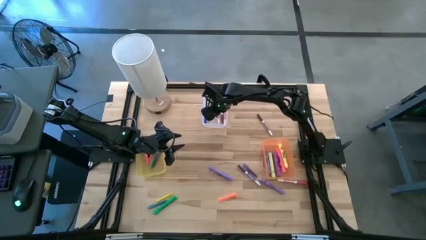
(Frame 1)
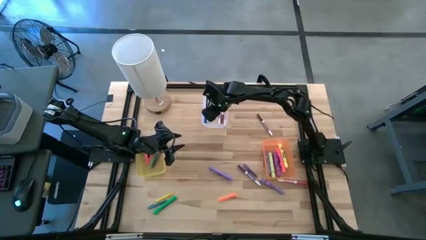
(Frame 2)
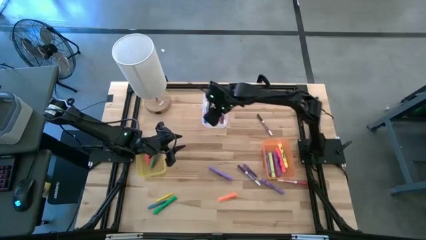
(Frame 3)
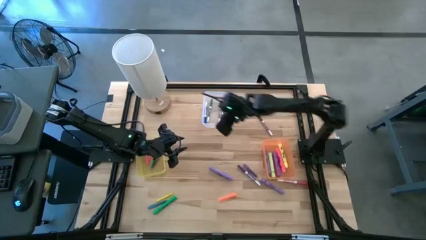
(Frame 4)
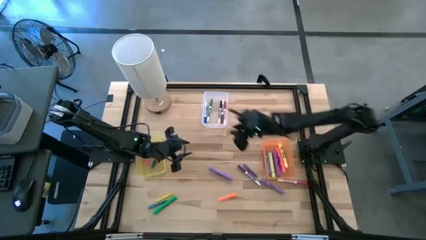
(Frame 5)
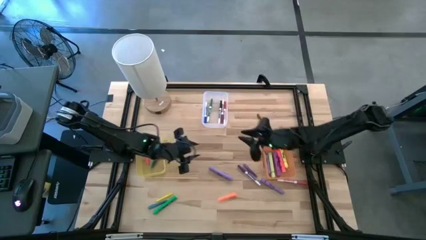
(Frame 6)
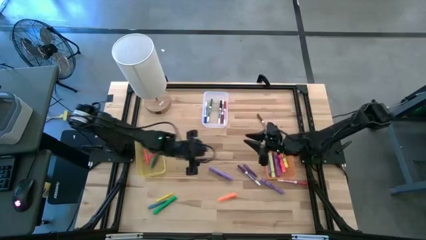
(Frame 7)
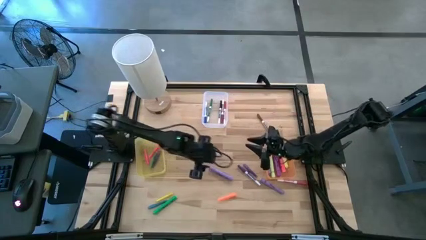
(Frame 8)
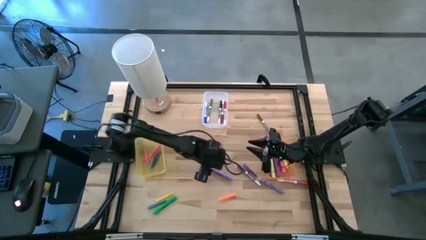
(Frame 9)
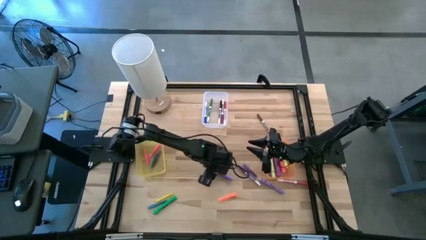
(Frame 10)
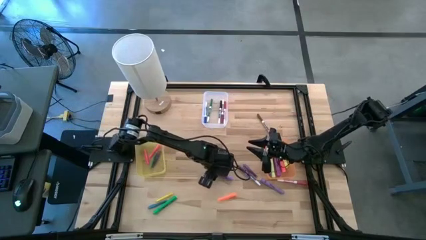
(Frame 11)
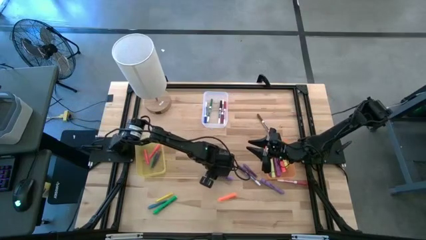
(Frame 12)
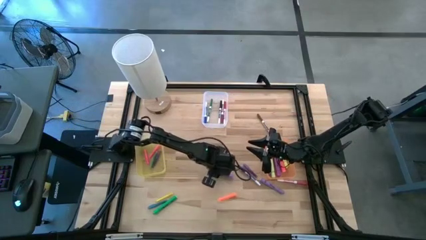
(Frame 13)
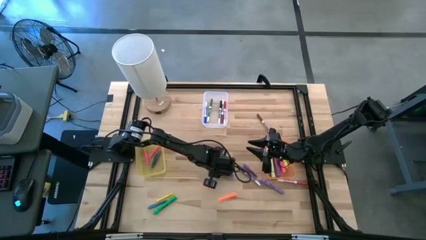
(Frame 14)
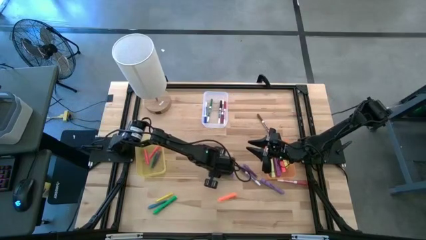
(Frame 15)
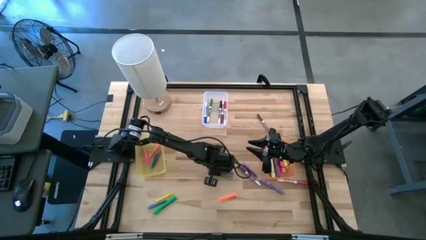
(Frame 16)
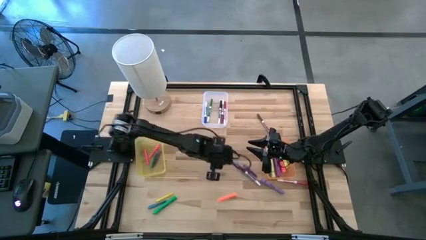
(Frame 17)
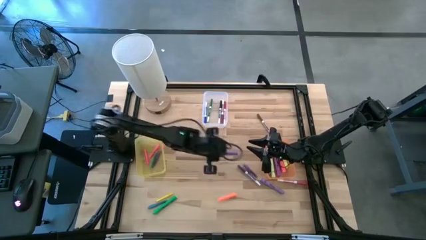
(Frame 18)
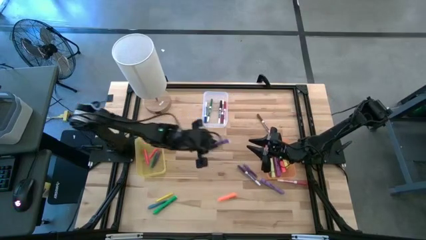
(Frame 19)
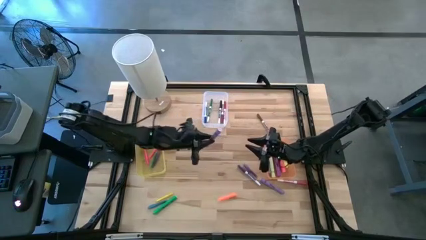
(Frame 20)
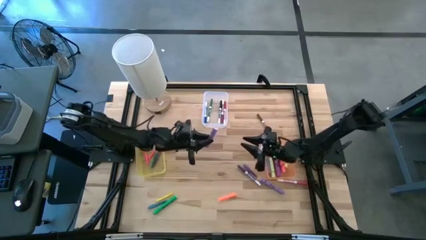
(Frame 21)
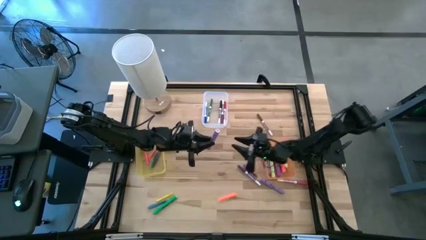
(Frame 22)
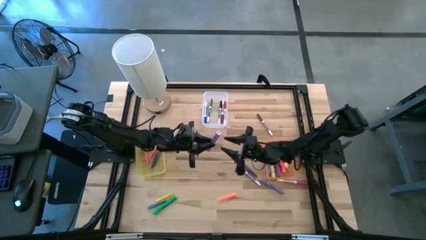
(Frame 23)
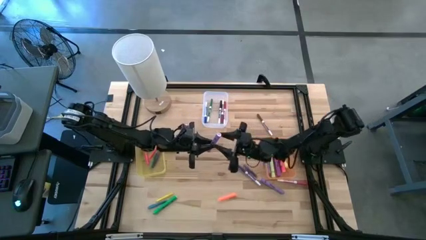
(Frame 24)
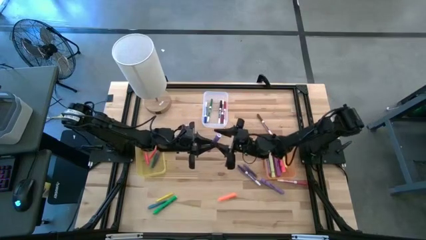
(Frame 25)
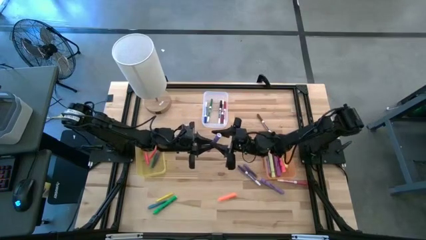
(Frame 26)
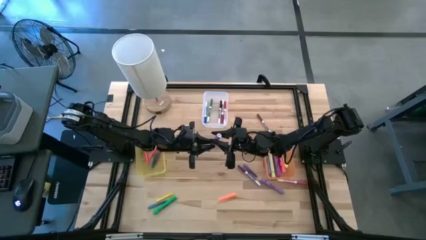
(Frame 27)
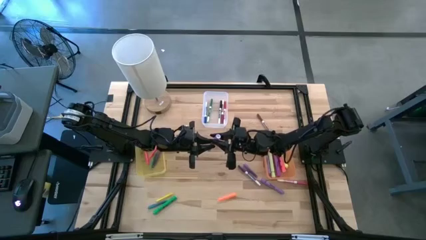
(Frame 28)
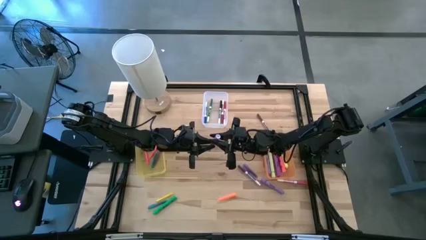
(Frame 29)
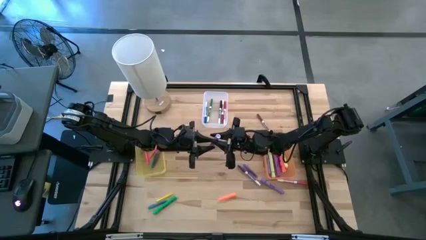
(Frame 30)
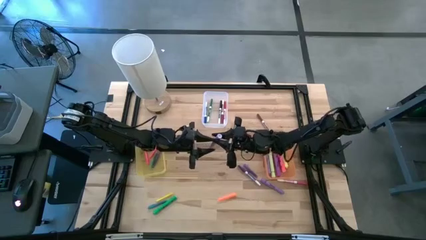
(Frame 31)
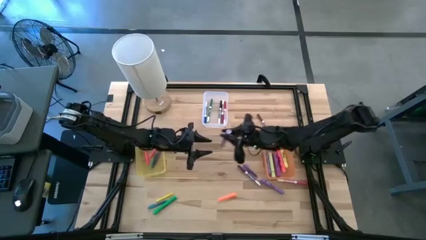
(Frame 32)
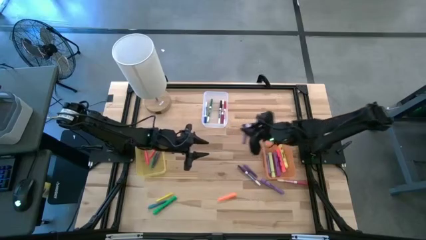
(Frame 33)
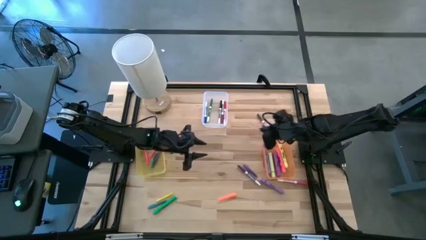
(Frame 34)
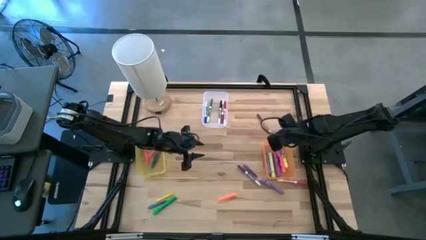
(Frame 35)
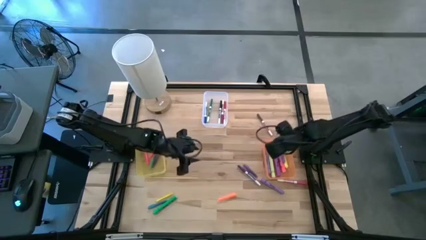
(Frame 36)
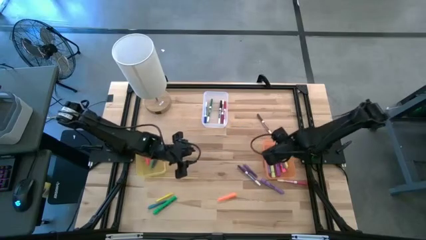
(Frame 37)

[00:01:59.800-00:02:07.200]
Task: Pick & Place Markers
Put the purple highlighter pen into the orange bin

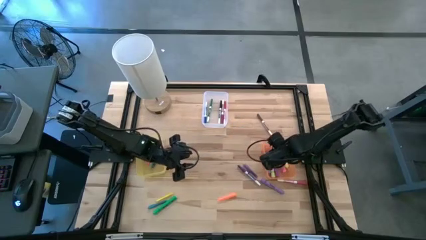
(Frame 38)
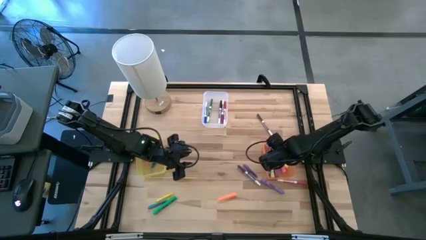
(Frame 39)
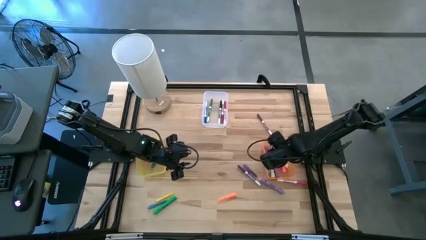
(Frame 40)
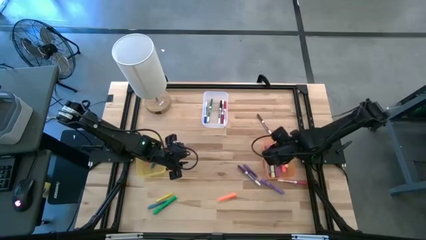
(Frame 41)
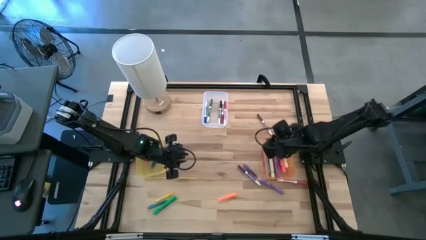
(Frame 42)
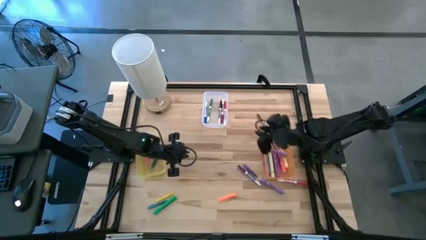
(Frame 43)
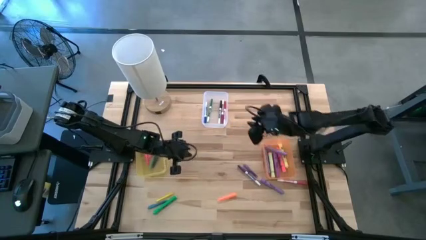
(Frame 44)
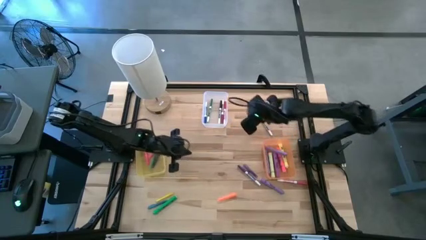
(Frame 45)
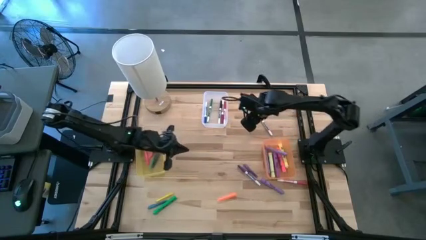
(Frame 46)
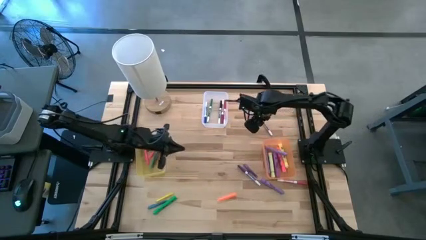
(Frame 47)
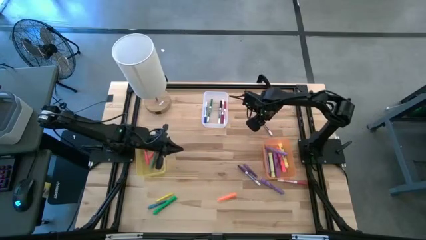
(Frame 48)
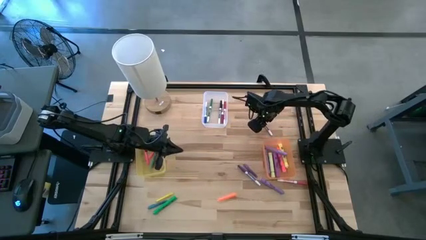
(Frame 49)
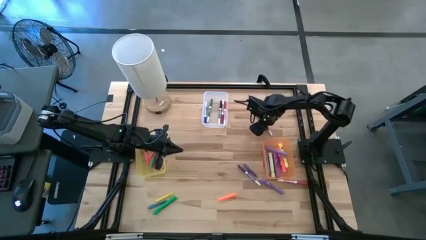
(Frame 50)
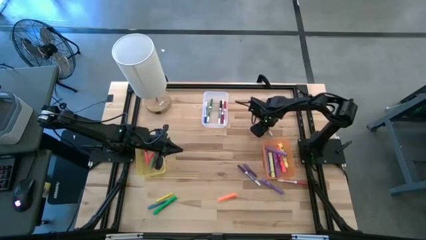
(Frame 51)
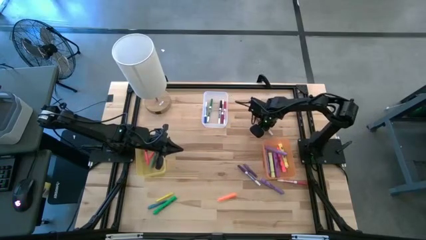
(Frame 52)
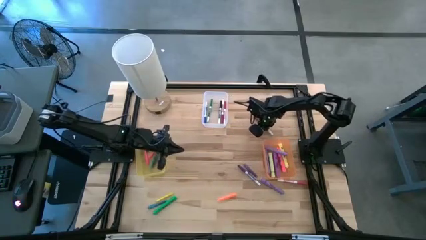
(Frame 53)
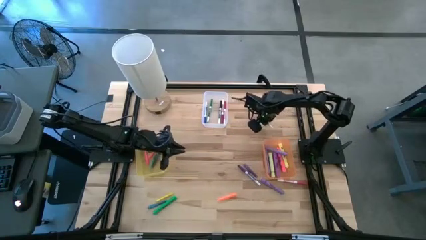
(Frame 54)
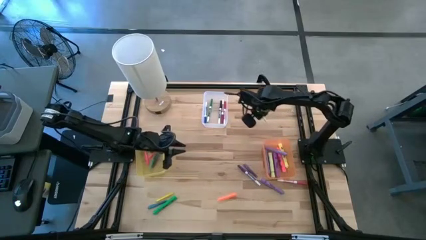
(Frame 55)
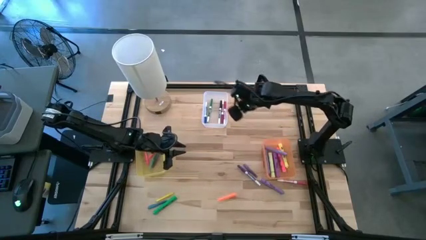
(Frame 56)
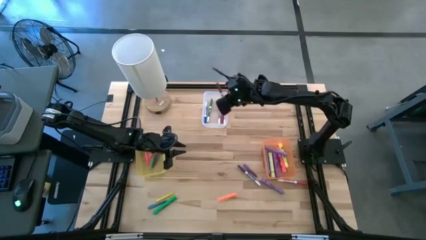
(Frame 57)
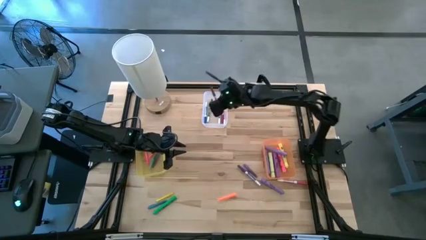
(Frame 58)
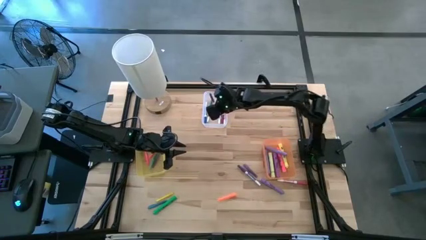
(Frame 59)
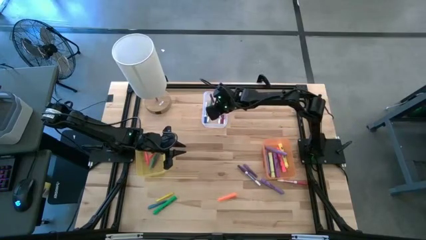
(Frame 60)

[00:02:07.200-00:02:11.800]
Put the brown marker pen into the transparent bin

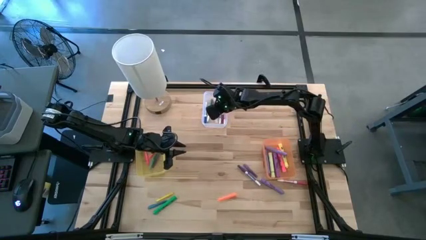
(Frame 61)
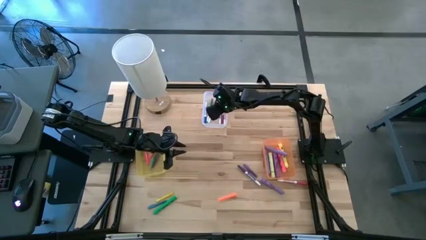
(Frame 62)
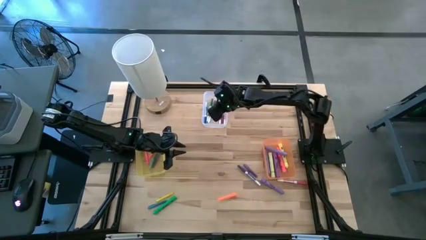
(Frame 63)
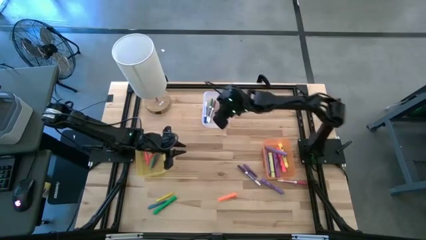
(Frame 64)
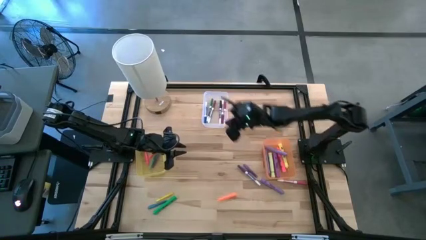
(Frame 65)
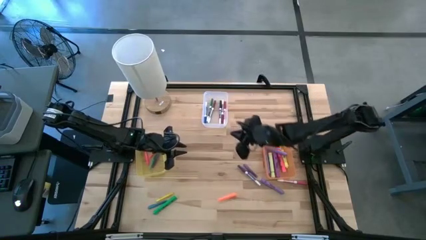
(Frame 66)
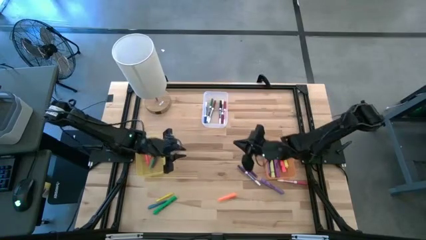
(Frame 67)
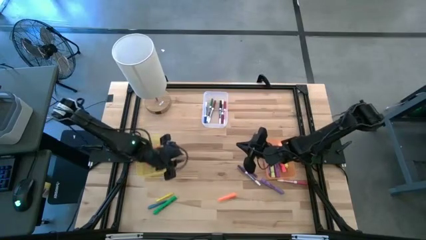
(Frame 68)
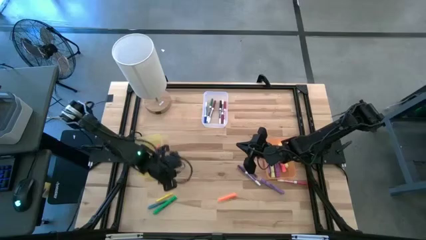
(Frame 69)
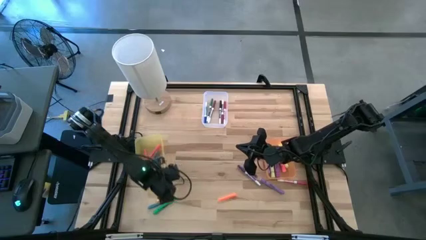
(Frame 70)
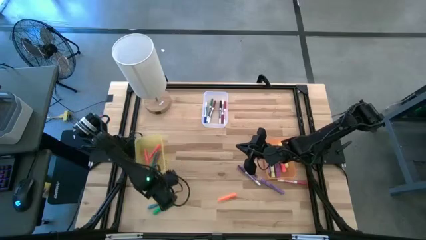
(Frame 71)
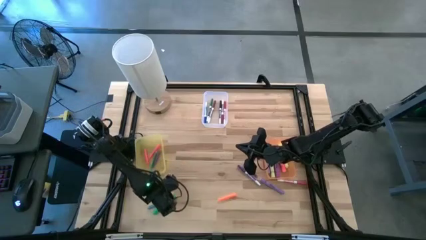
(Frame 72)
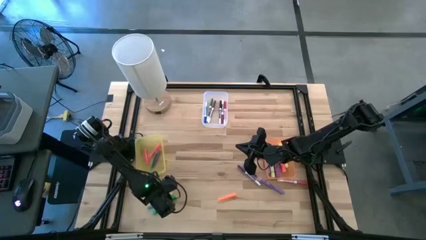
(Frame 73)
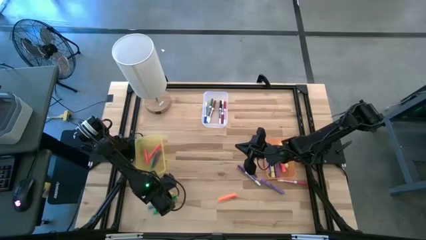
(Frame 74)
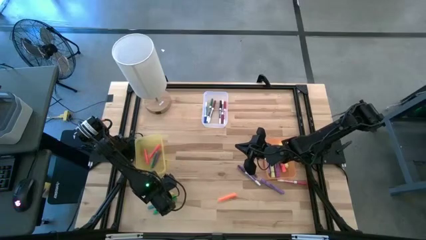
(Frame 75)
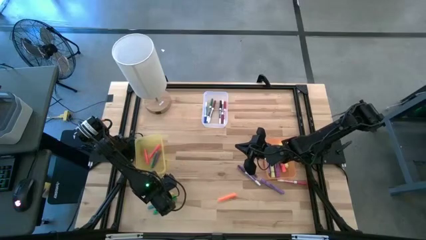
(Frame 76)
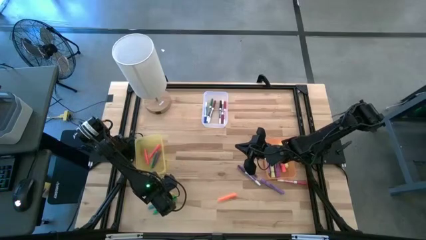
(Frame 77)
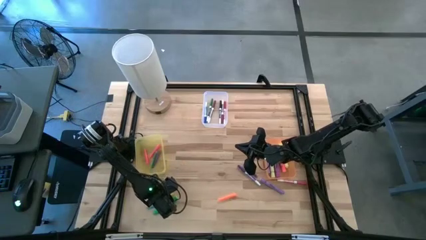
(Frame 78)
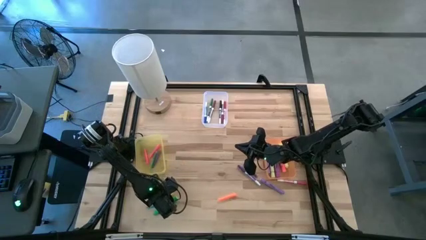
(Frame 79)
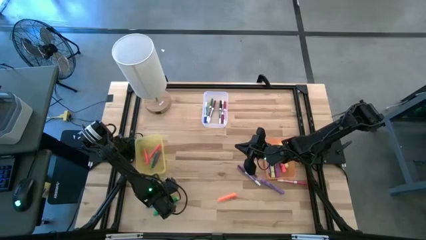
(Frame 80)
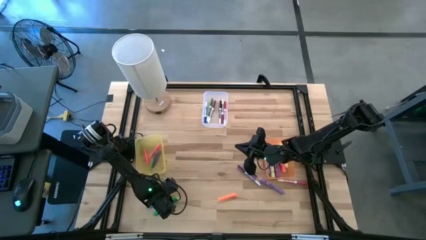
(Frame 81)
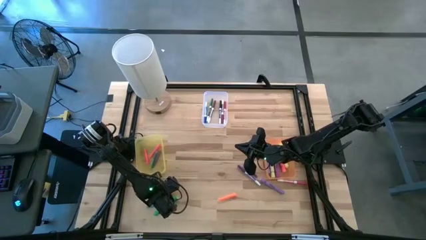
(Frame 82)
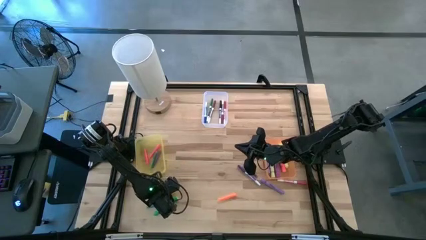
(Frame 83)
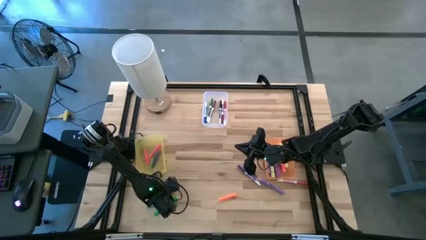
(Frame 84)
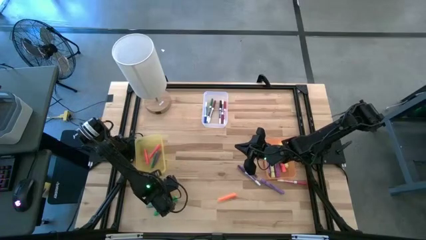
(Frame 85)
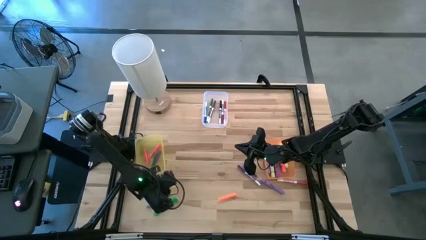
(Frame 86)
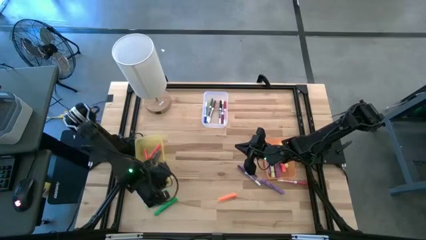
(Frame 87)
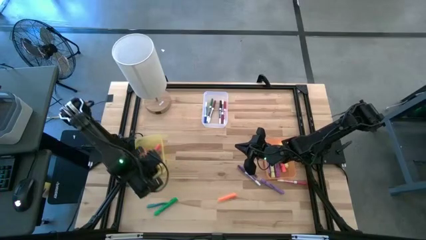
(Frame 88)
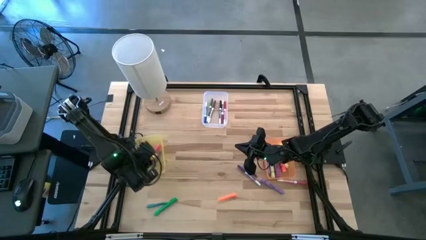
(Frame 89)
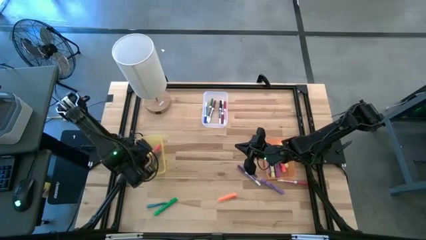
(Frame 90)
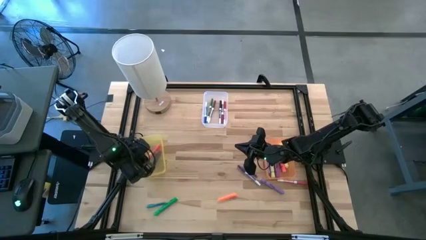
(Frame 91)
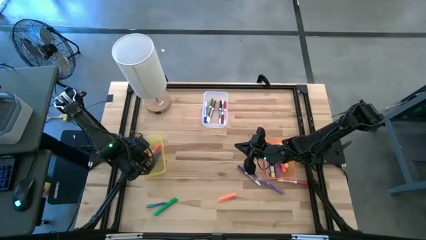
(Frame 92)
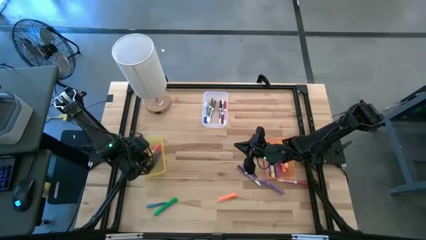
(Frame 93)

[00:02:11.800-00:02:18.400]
Put the yellow pen into the yellow bin
